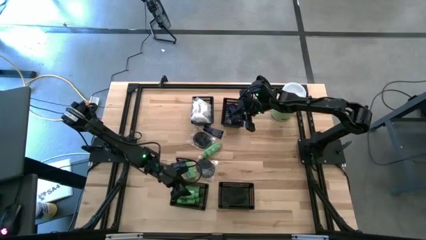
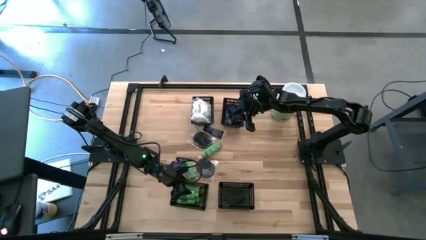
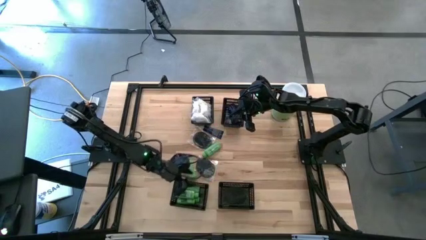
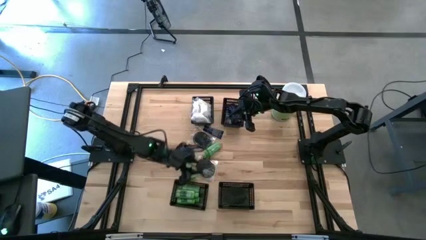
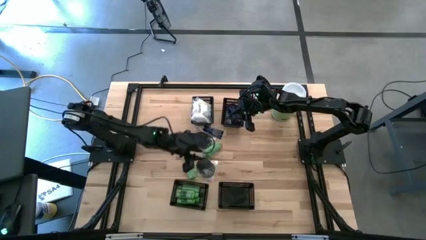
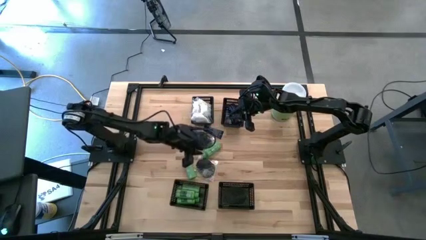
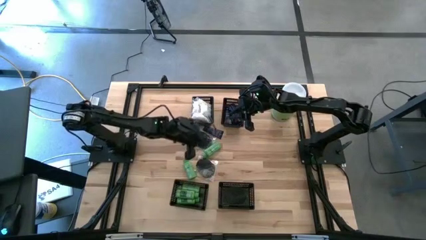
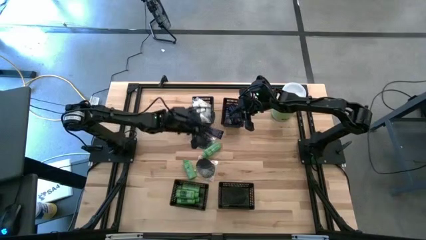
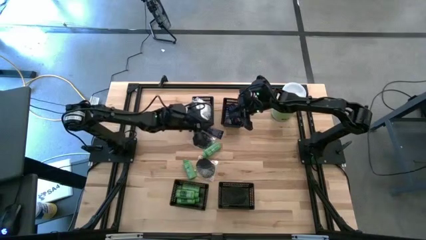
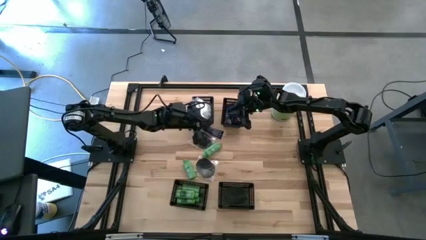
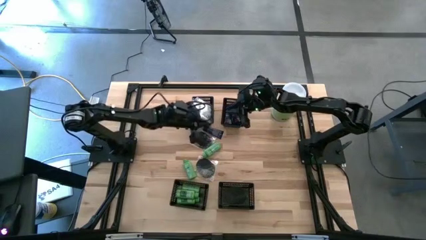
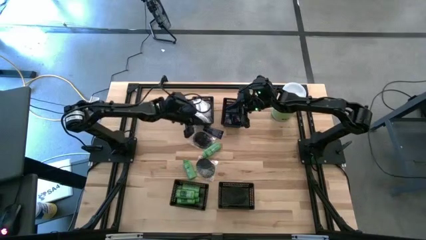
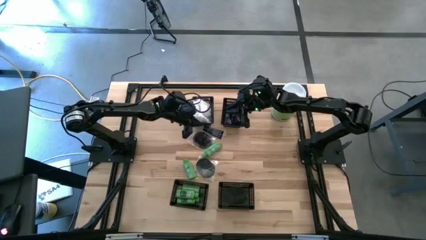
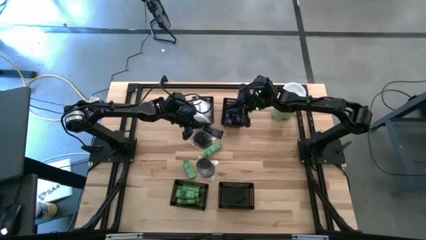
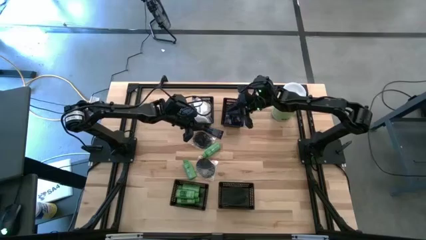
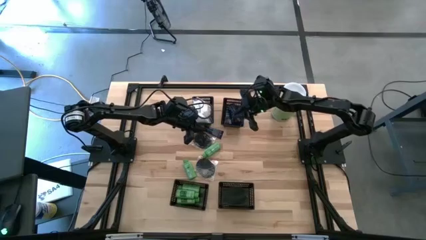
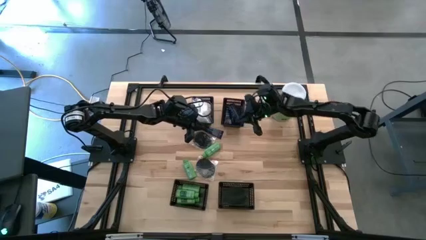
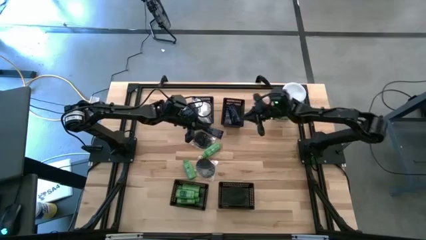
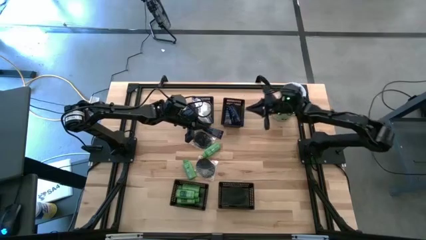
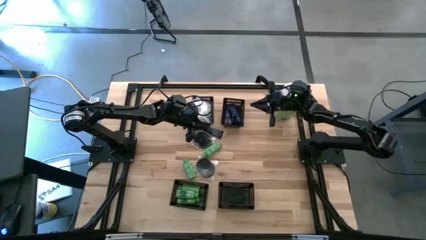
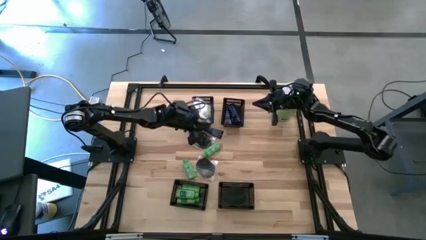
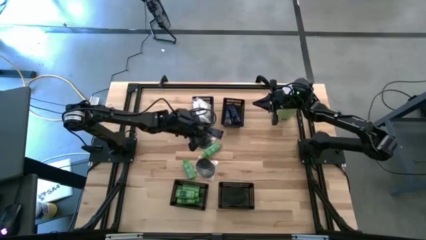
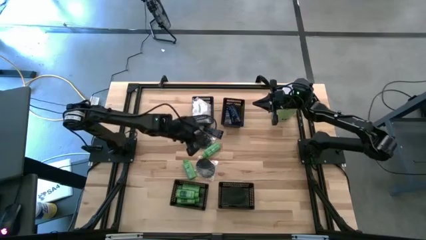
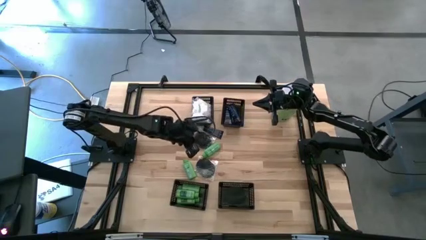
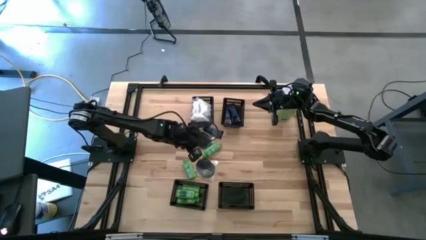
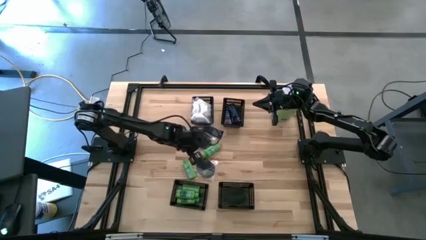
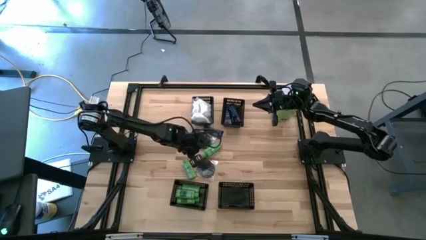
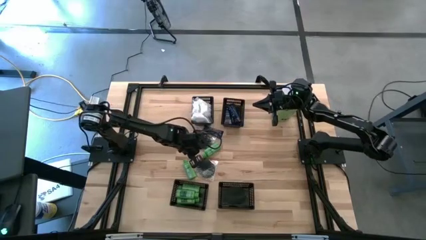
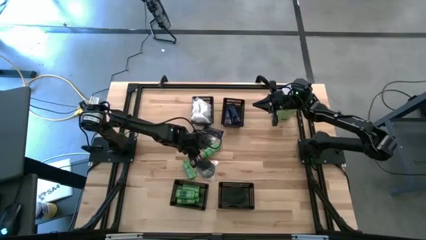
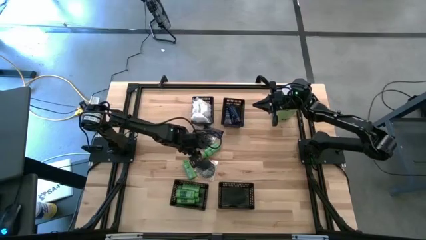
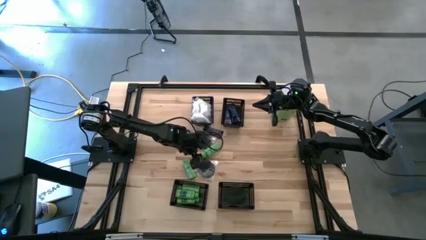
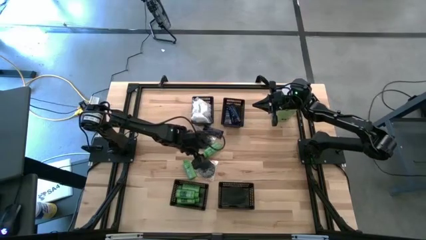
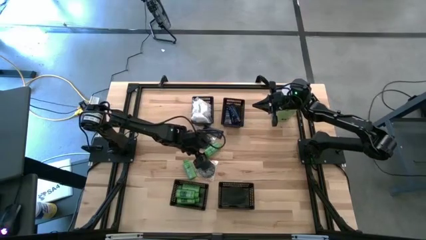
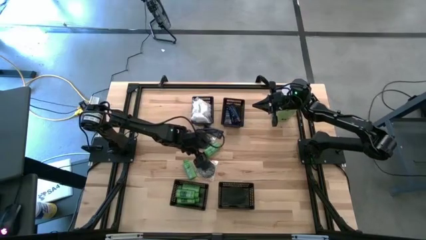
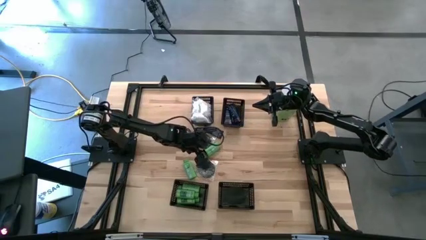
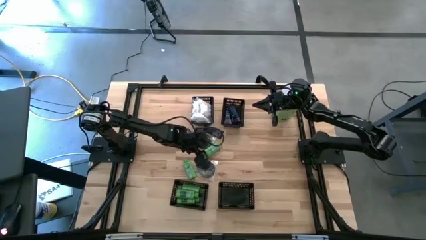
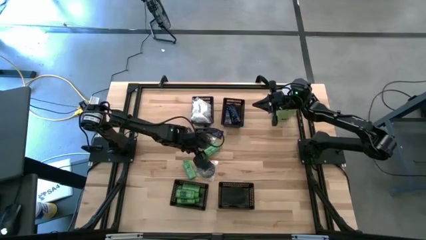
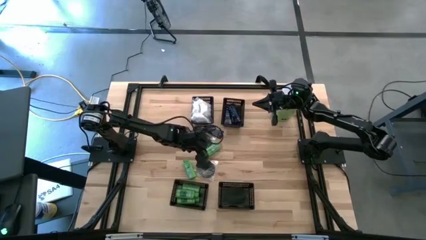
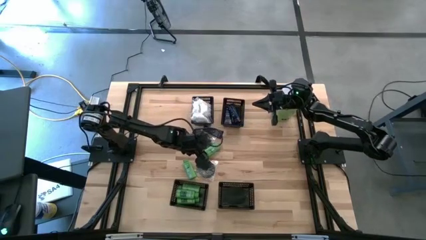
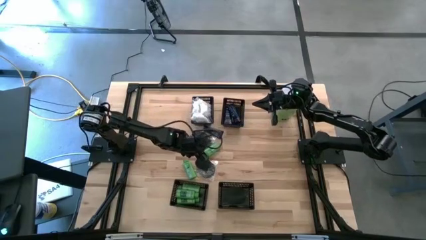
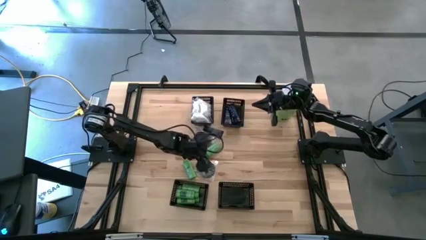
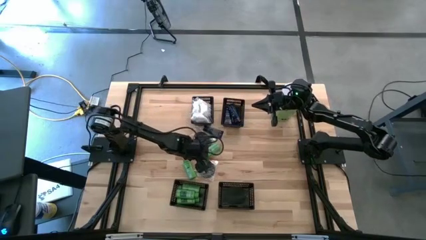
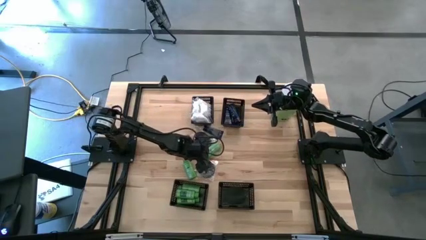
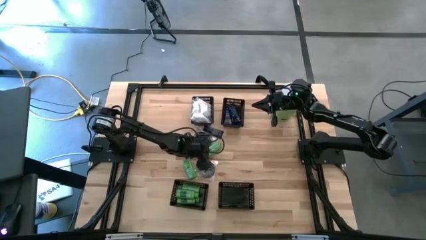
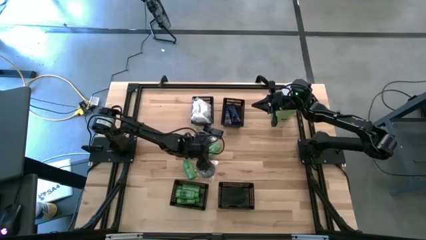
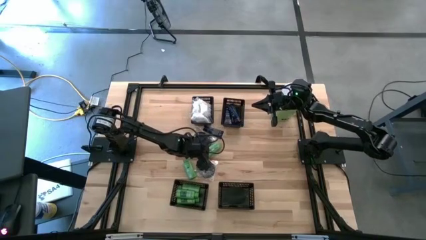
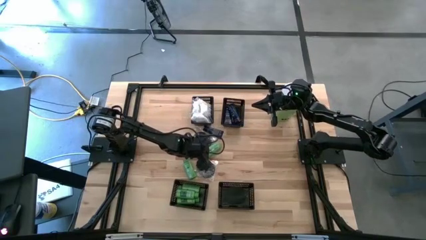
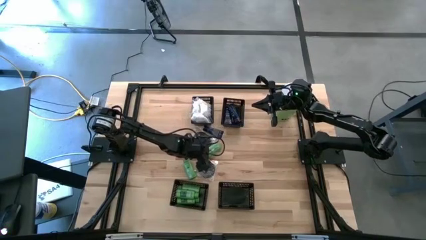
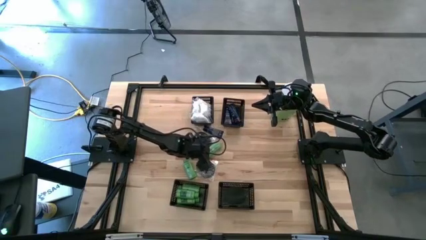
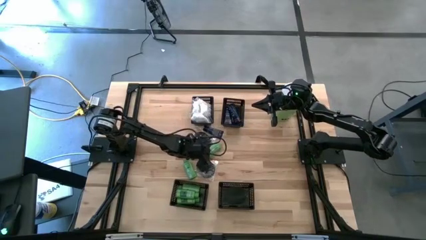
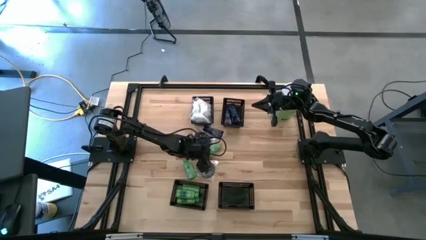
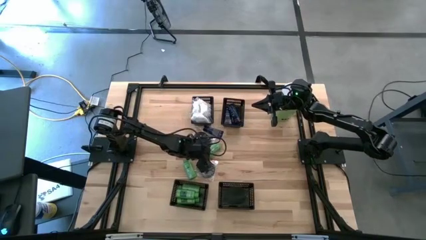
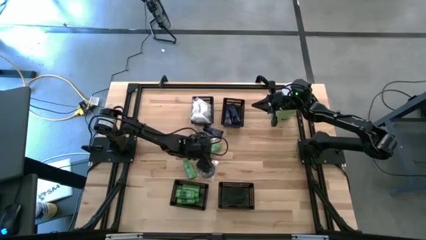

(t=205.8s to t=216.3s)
Task: Pick & Place Travel size toiletries
Put the green shampoo into the bottom left black bin

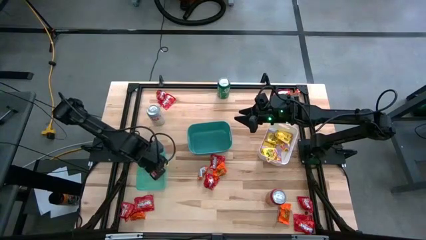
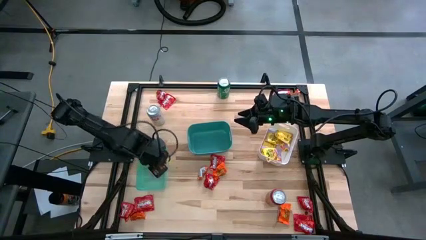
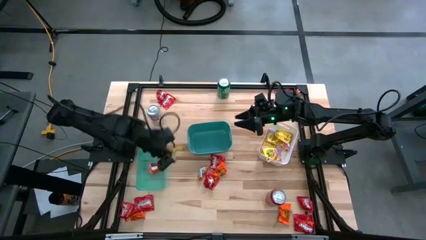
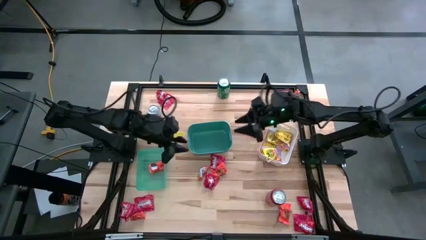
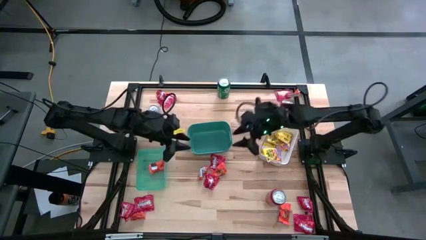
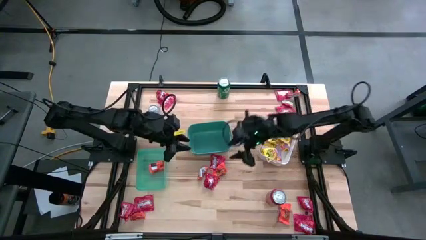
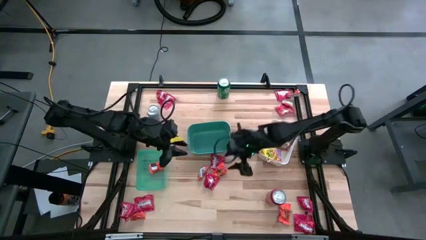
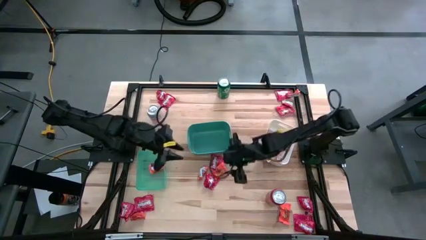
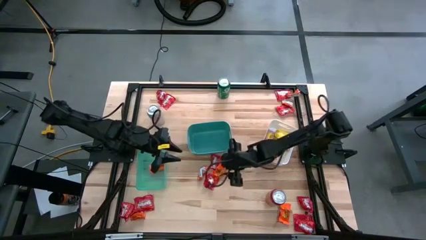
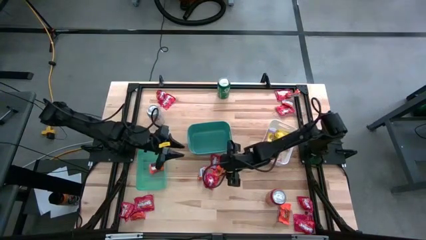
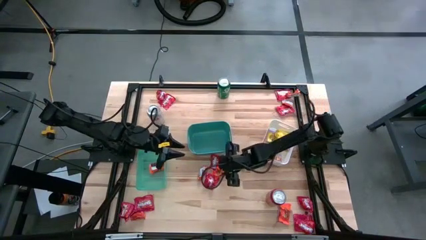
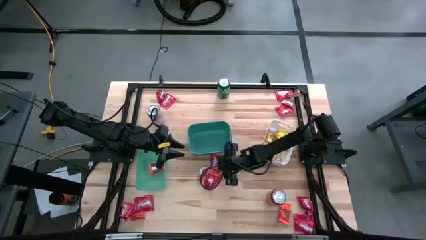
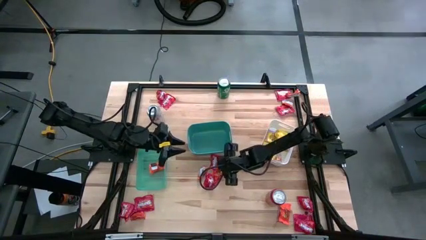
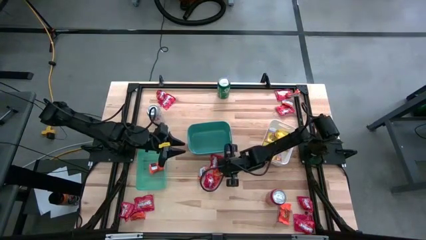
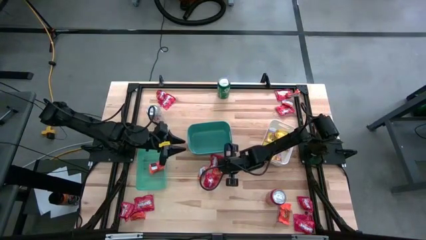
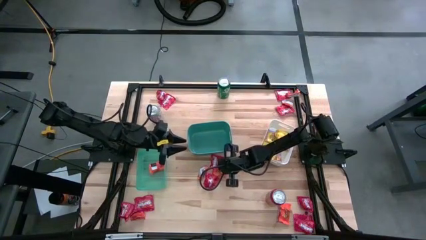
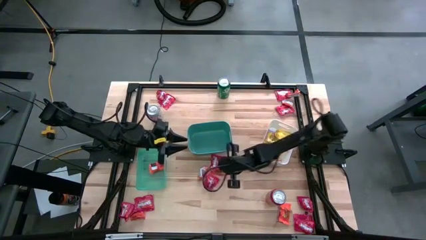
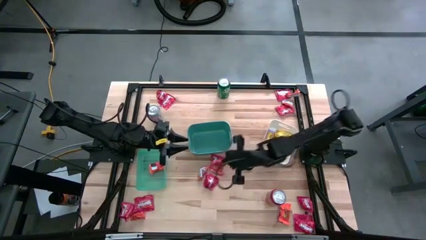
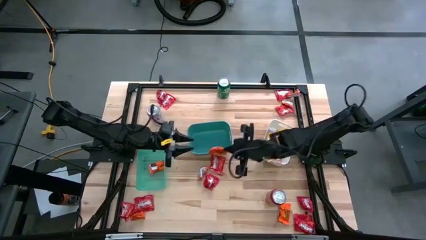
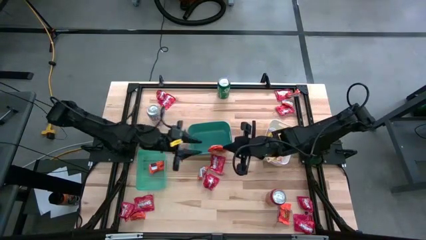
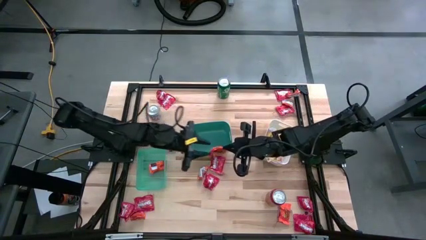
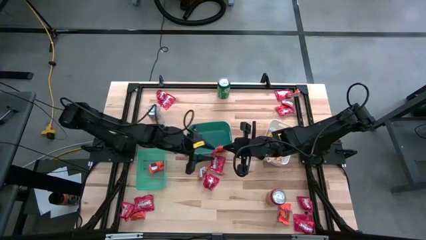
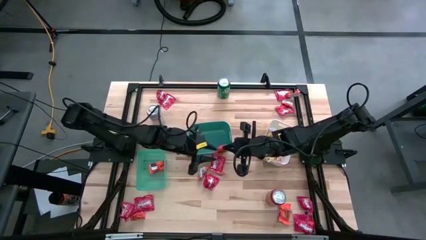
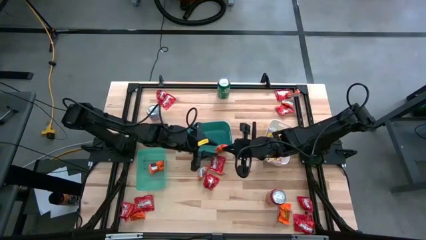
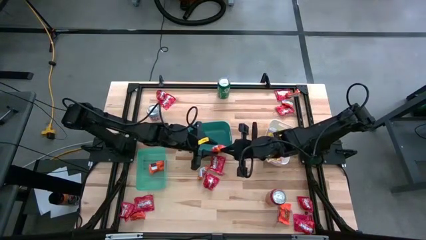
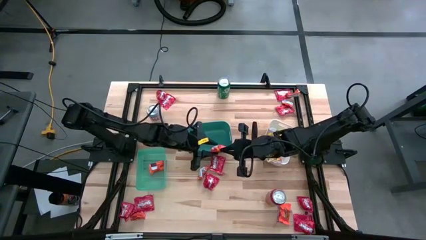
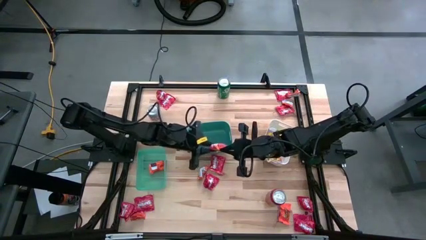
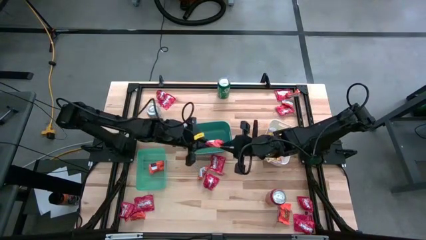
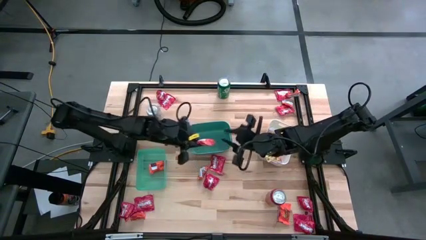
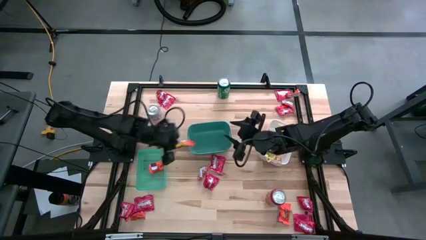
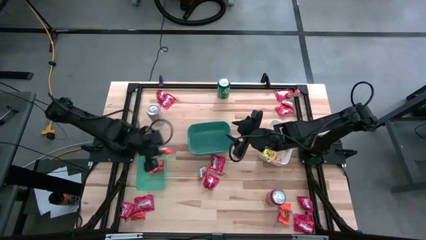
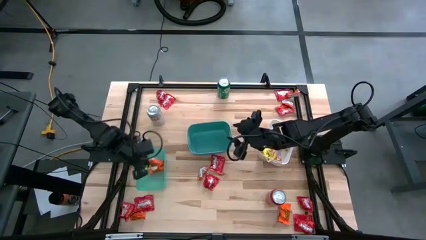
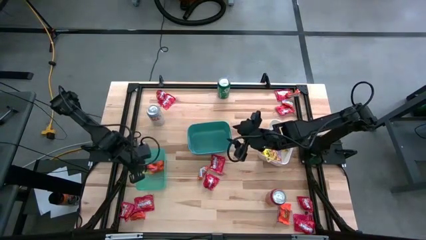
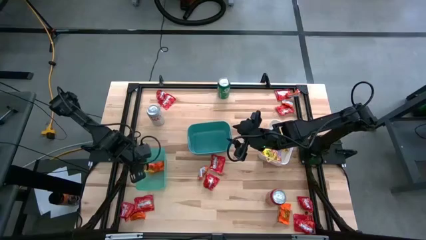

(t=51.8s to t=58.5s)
Task: Sort candy
Put the orange chocolate into the light blue bin
